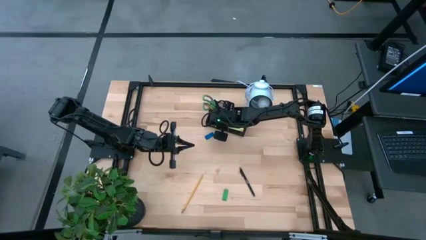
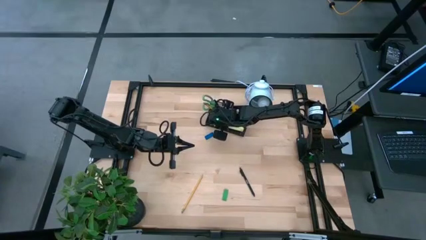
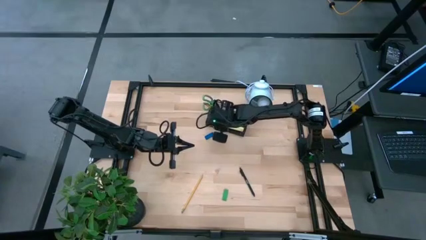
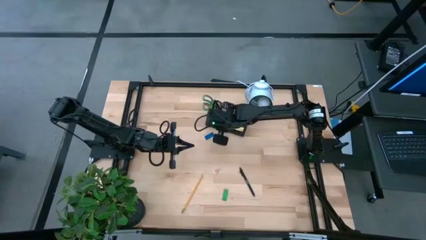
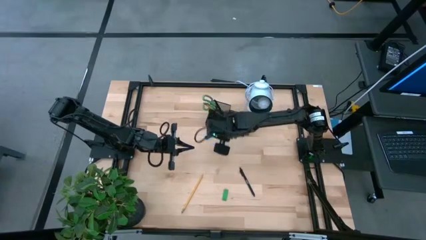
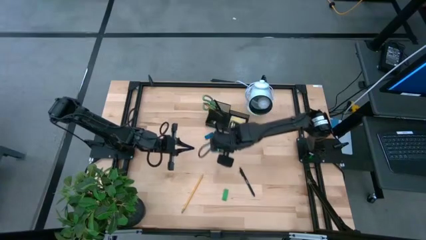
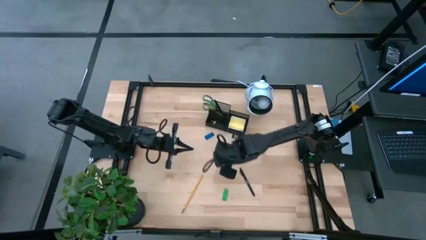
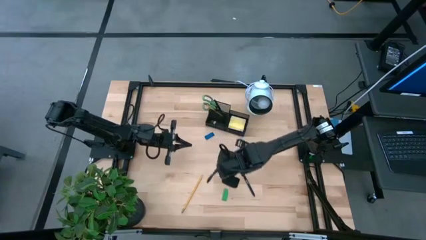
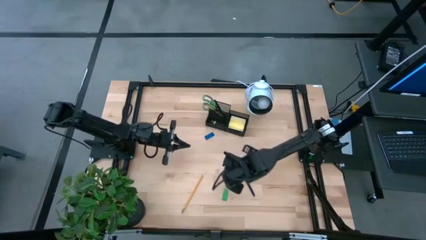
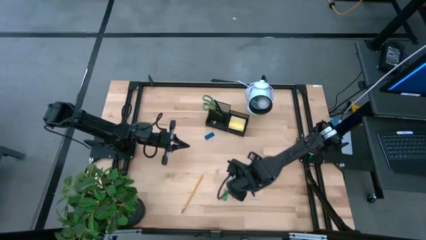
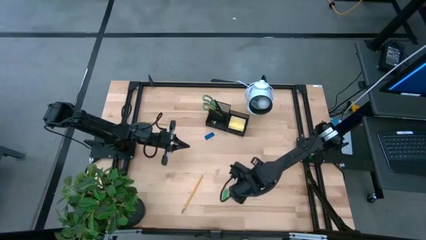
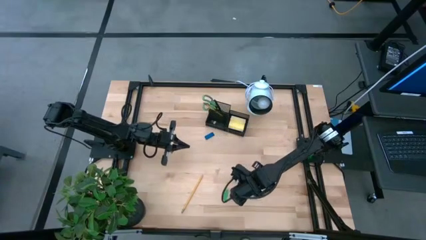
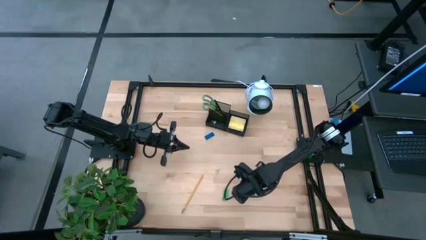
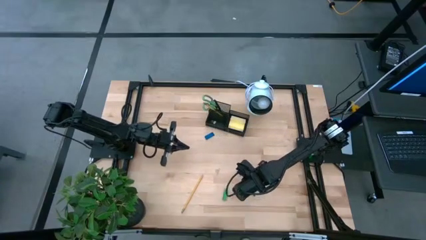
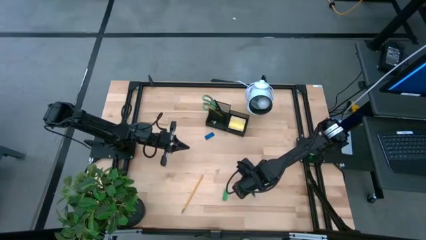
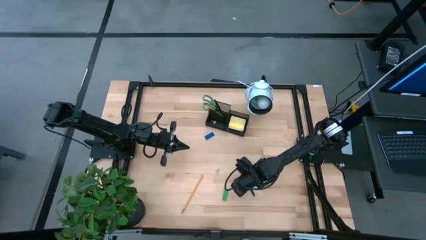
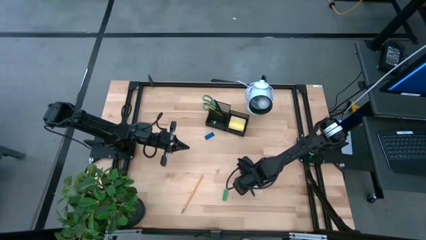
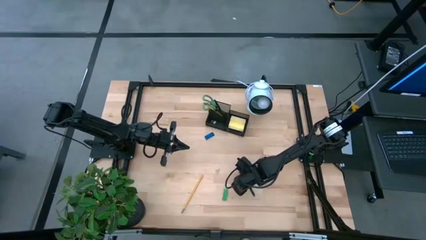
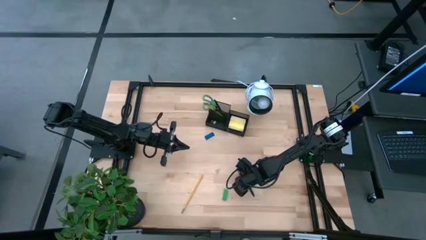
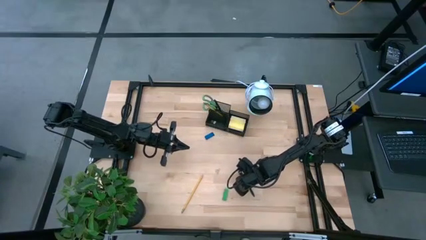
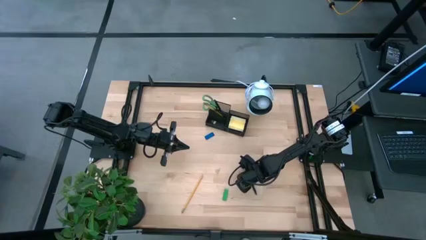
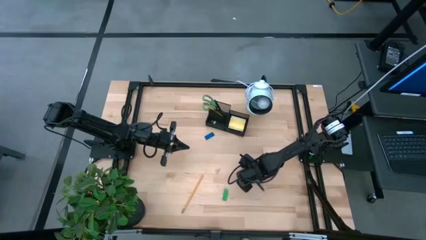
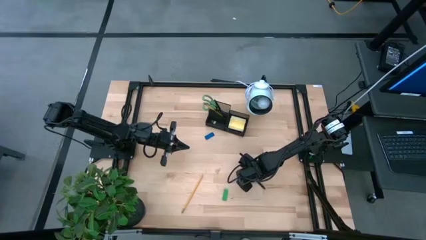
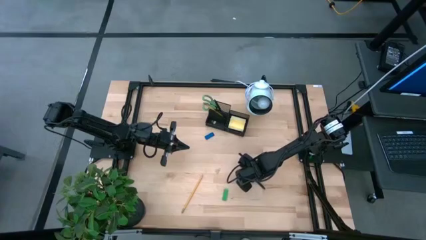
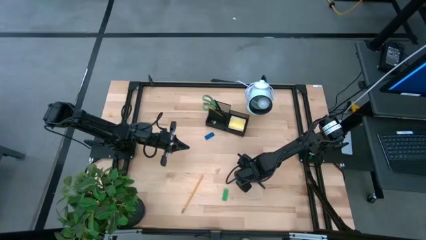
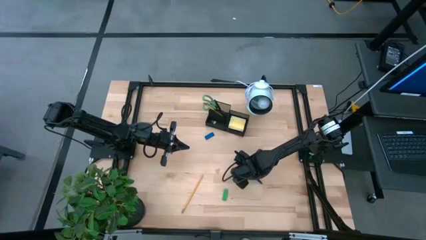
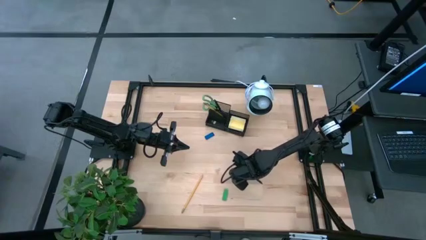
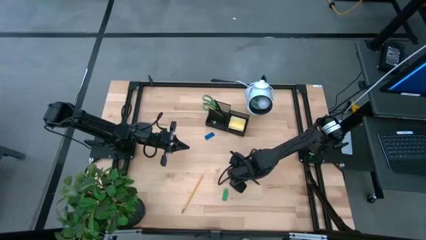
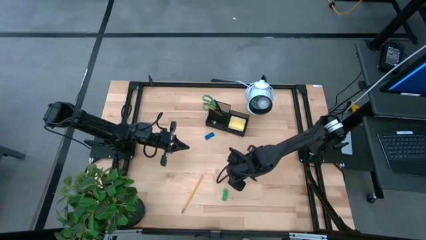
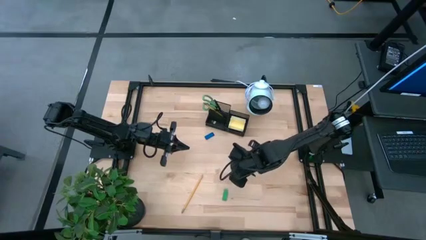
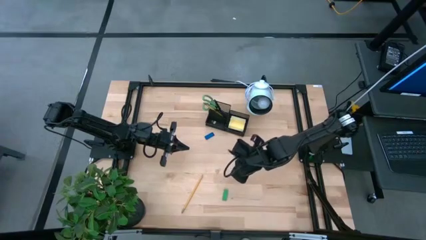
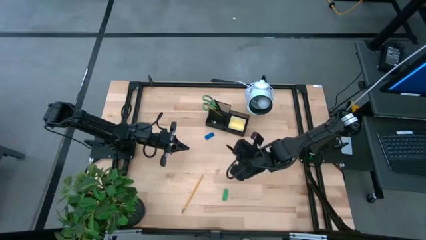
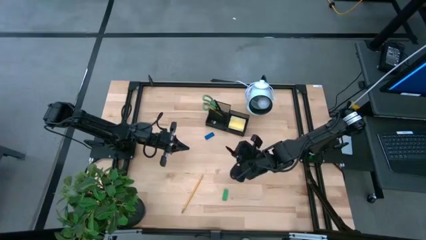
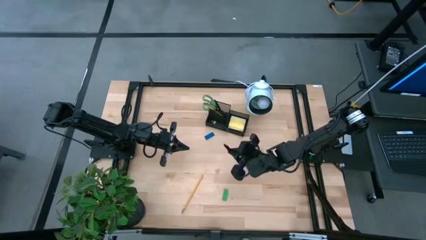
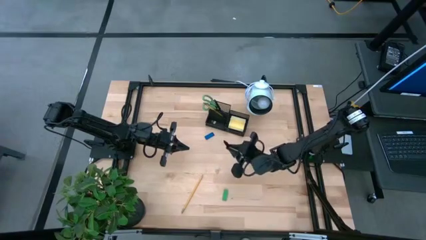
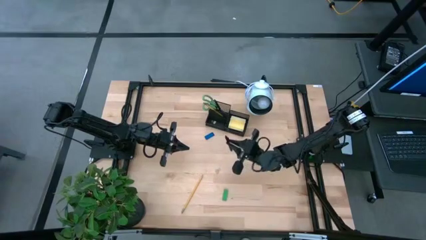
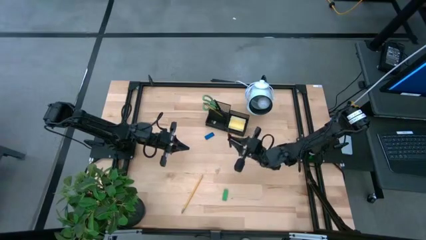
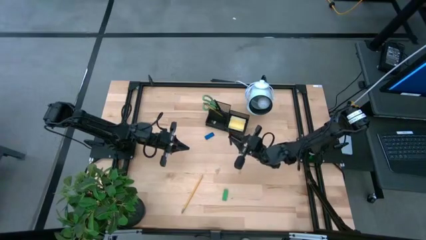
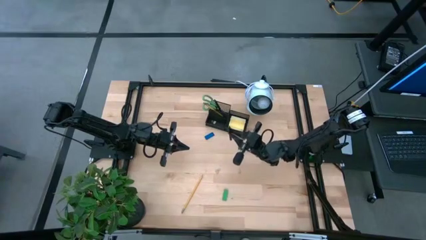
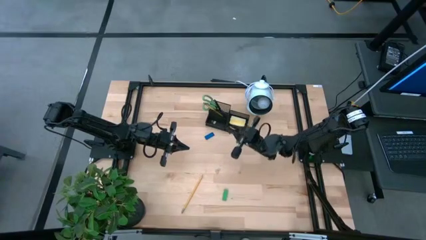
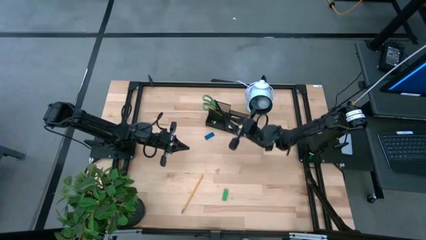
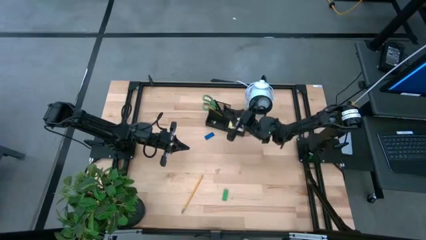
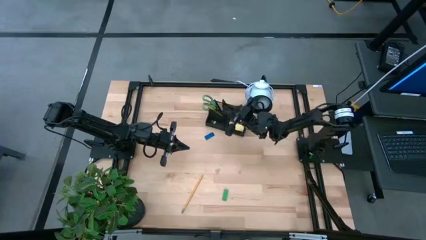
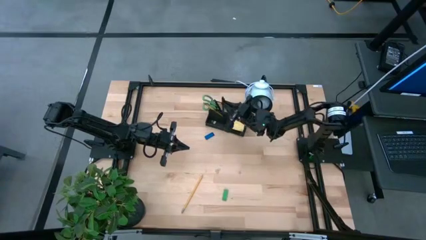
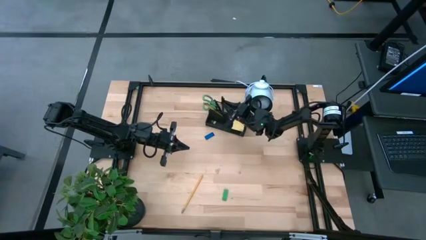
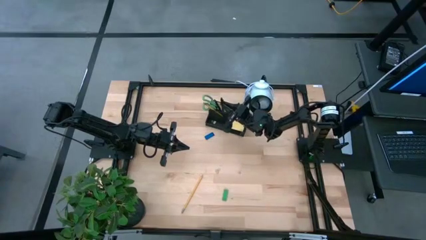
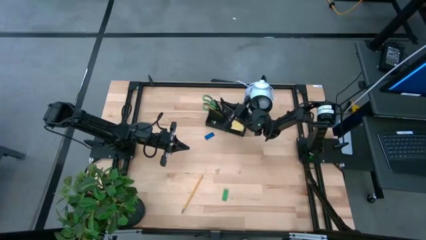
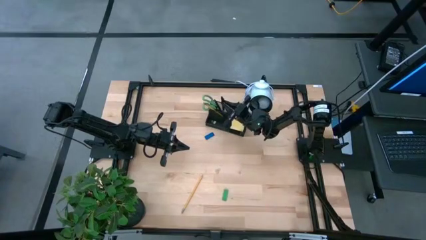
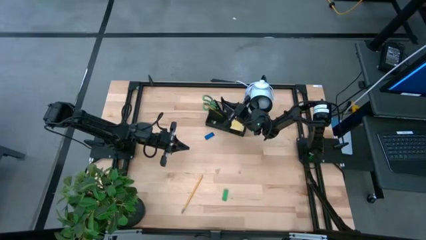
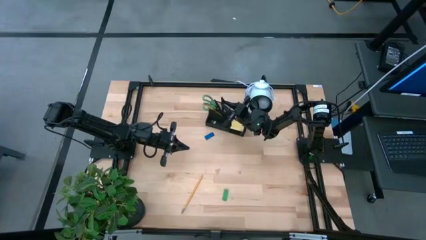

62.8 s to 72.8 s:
Task: Pick and place office supplies into organizer
Put the black pen into the black desk organizer

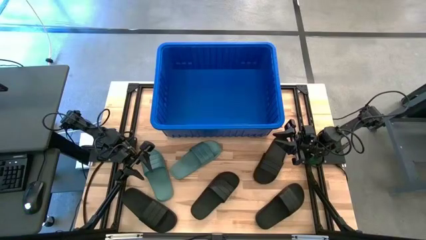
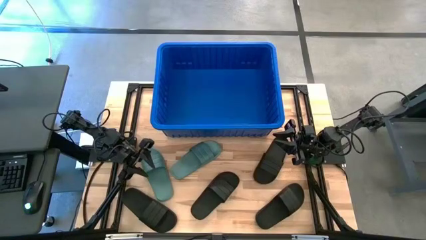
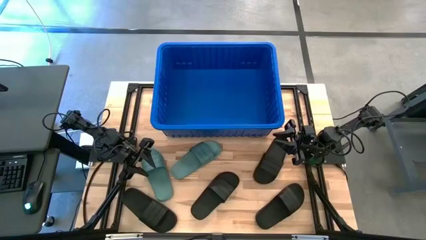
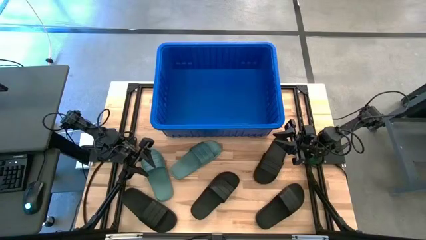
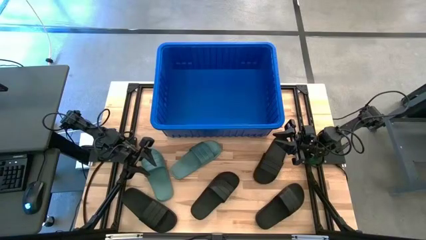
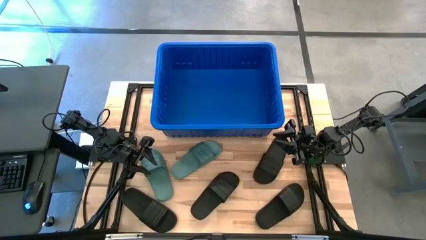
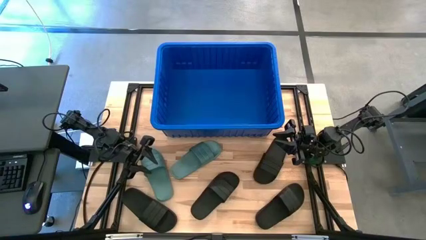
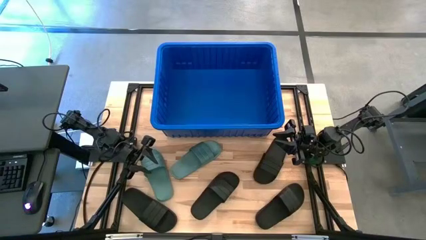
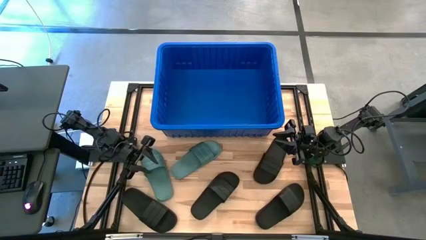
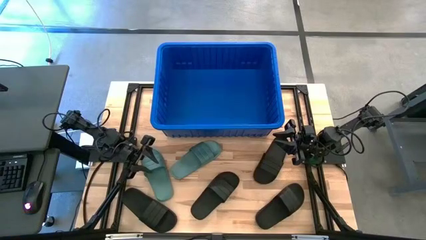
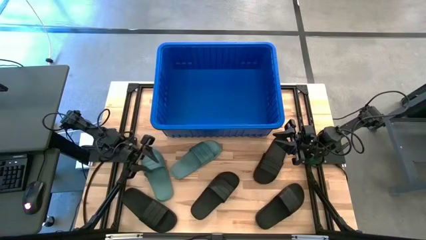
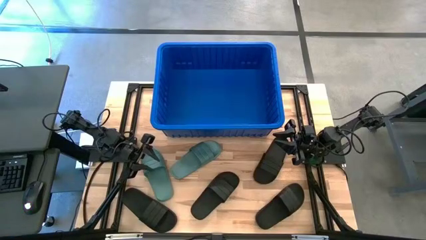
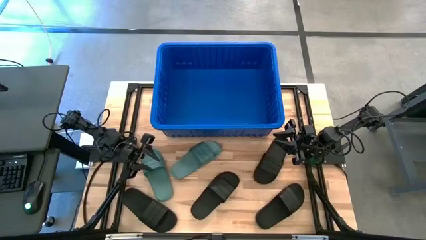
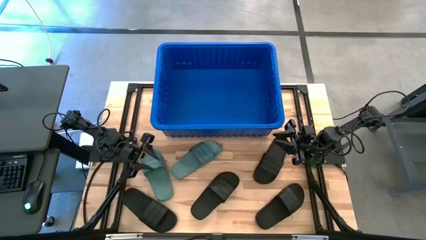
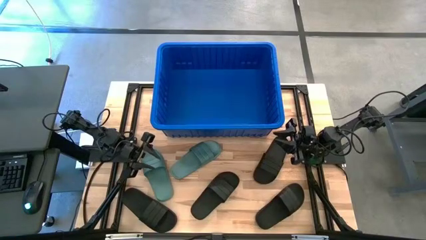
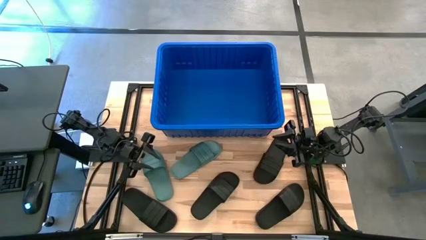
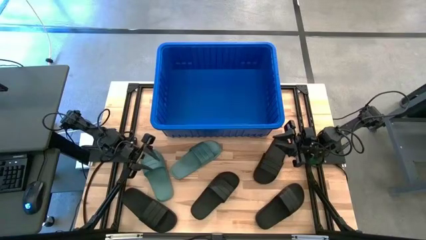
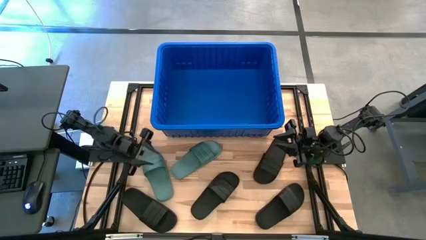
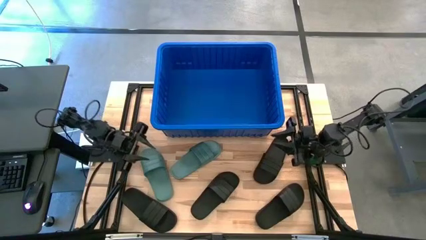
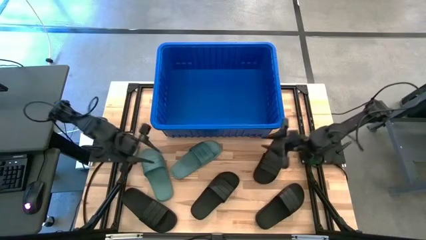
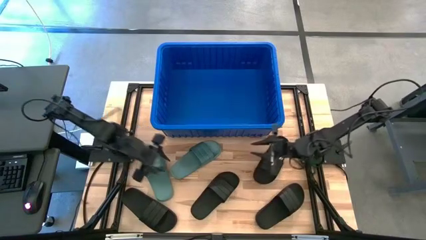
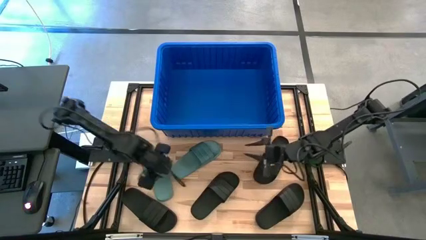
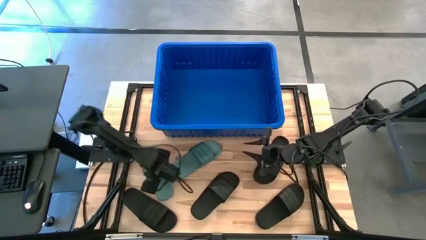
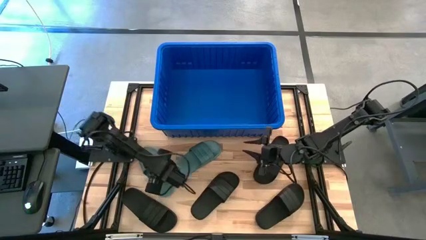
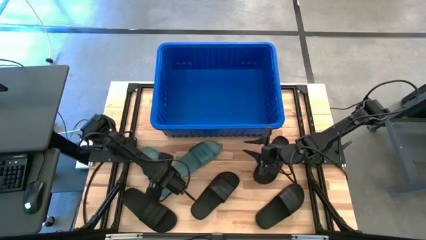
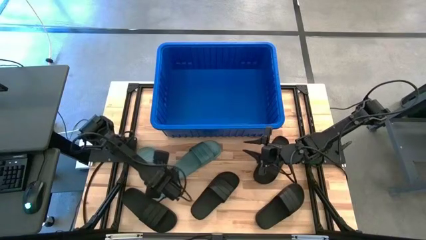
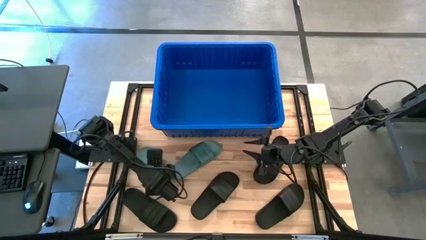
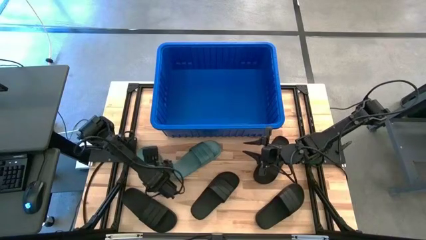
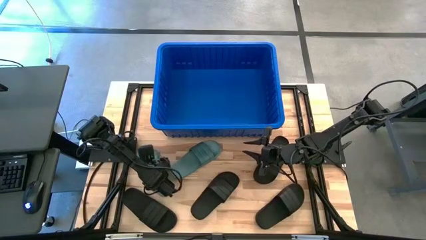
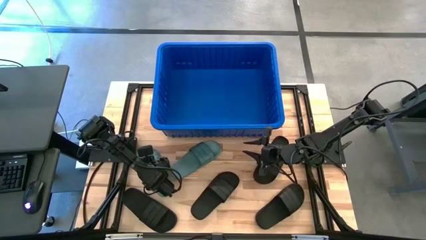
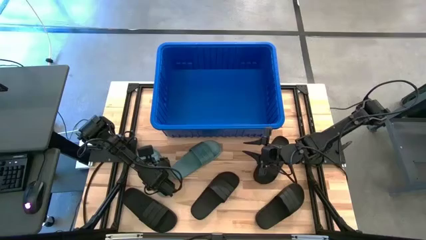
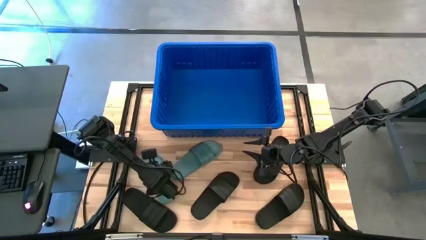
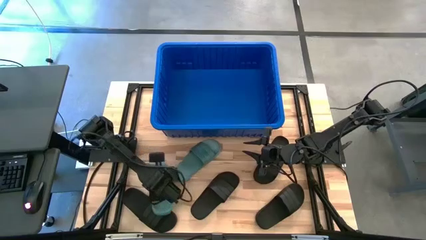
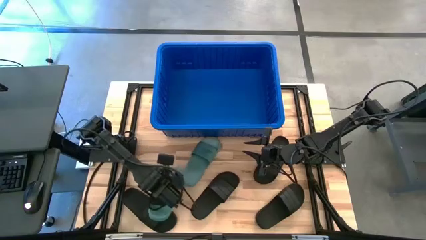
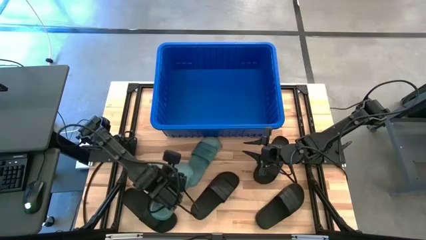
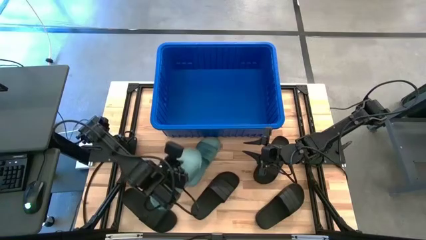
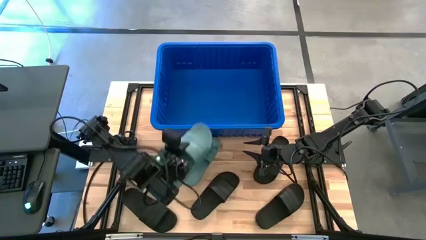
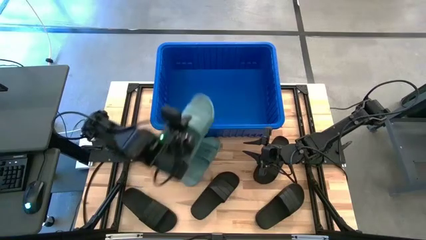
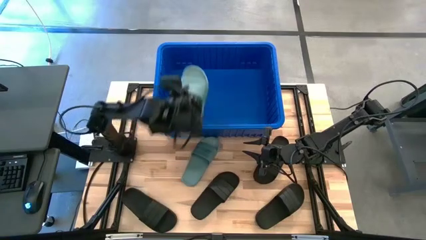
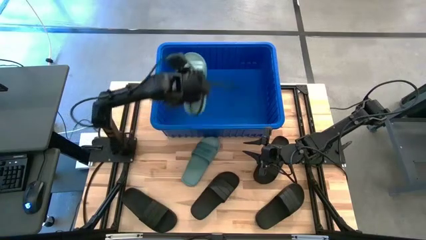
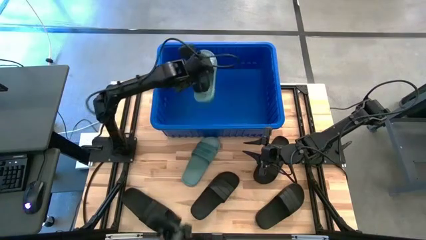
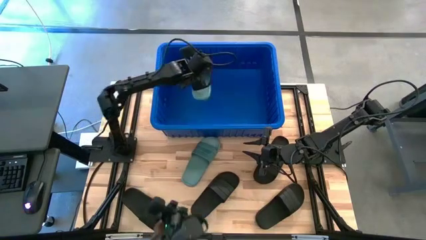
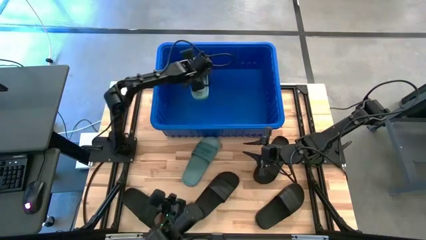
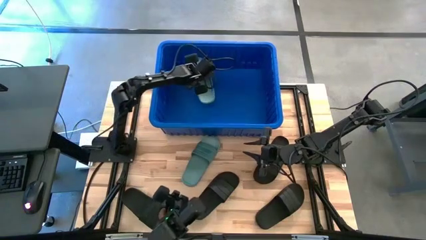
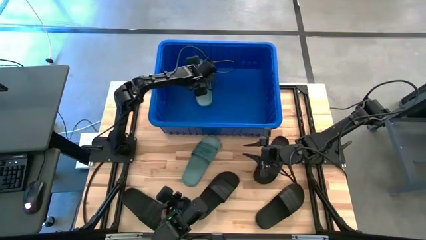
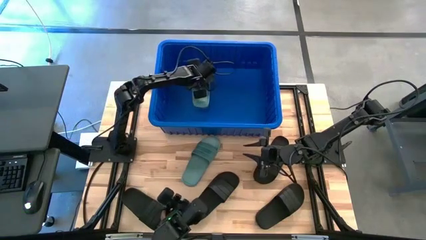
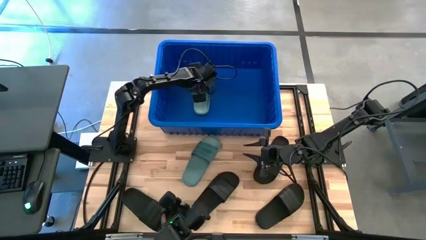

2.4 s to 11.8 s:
Task: Pick and place slides into bin
Put the green slide into the blue bin
